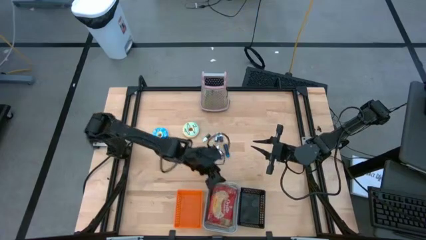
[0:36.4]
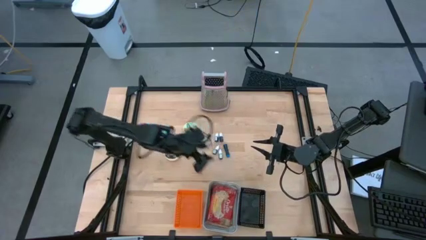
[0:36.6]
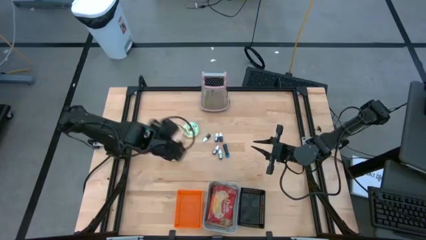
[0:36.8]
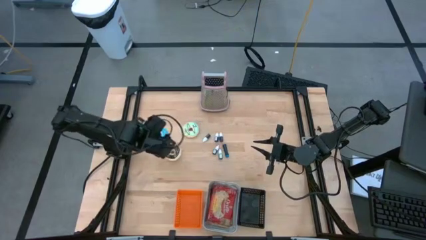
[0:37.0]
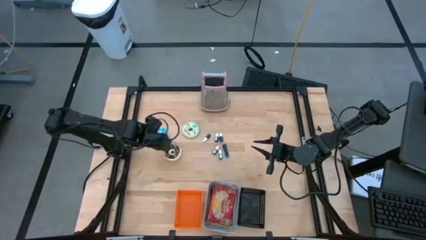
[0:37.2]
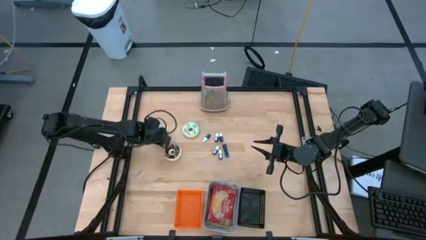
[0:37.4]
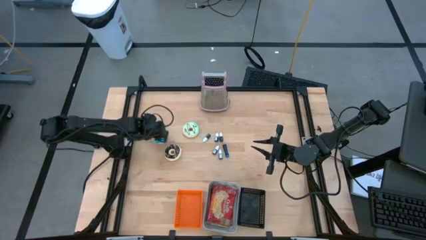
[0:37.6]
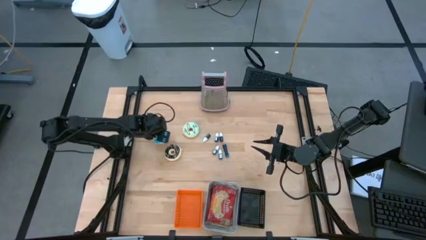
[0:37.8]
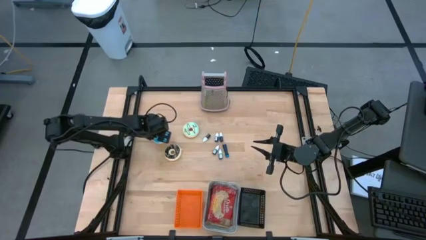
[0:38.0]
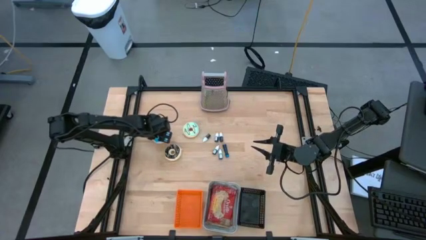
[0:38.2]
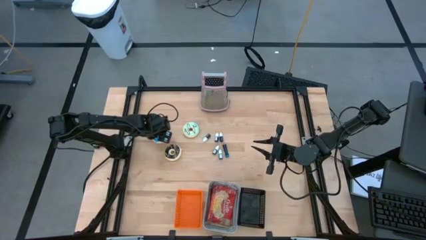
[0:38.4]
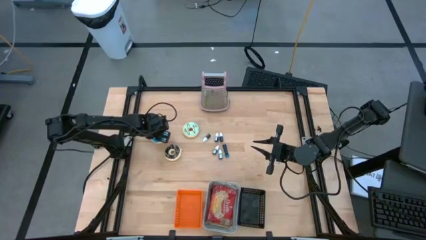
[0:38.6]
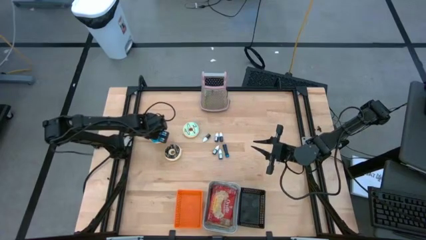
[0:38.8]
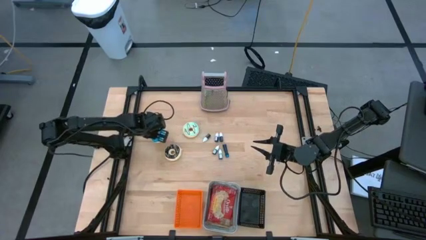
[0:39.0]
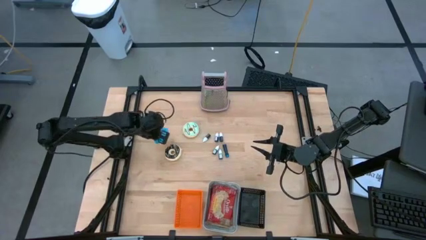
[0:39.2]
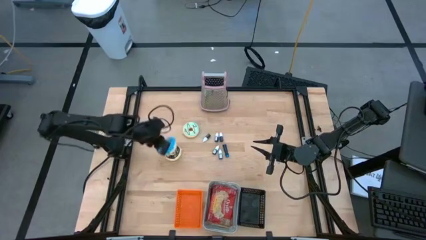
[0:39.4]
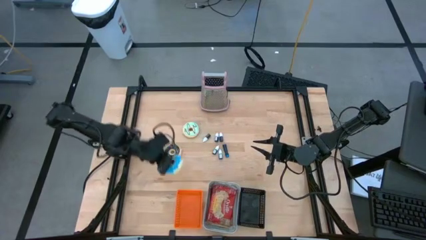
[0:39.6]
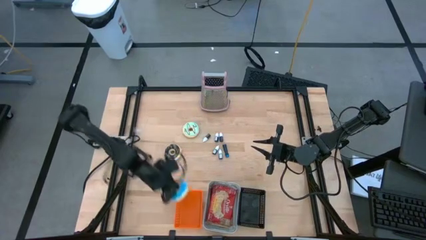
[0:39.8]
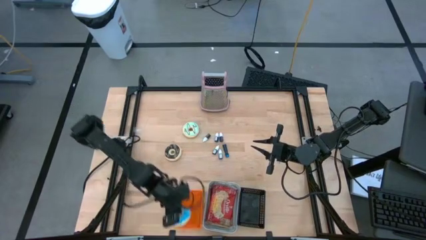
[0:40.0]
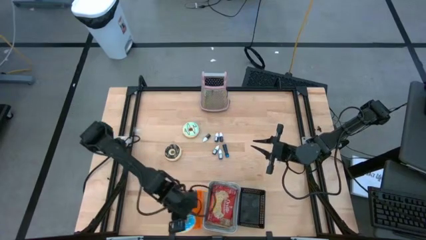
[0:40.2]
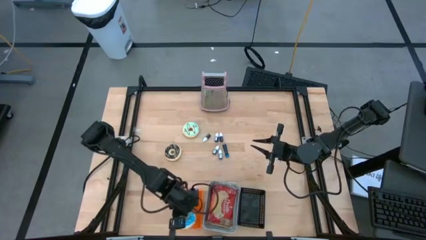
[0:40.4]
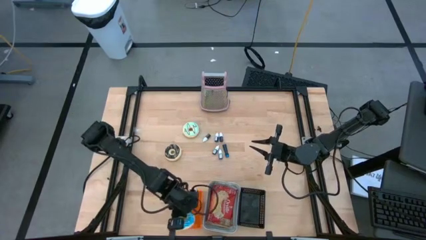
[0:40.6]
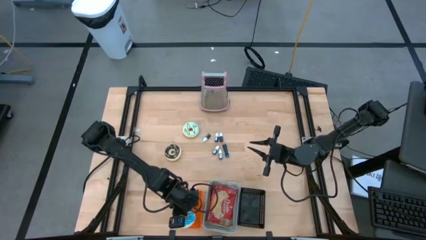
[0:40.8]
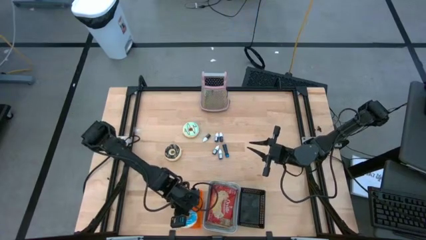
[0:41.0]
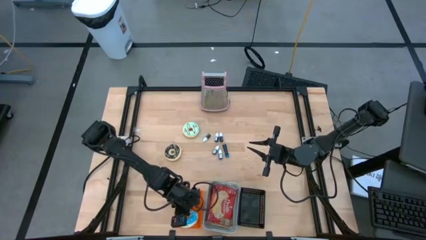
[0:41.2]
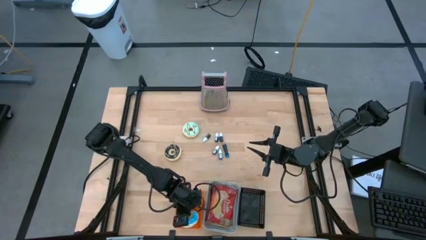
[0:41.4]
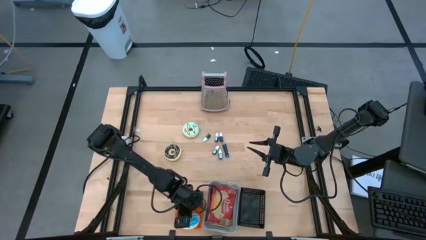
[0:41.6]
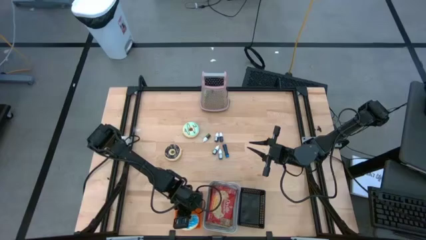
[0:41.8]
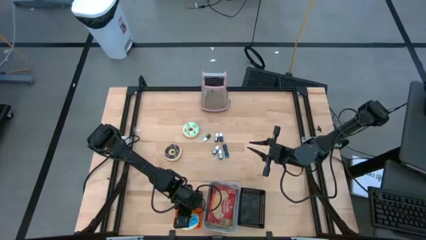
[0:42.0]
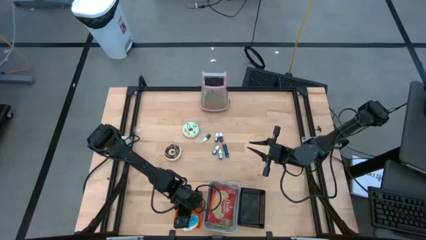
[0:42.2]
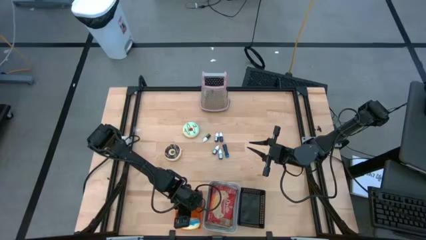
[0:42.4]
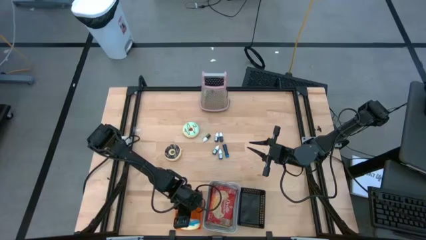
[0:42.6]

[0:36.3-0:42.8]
Put the blue donut into the orange bin

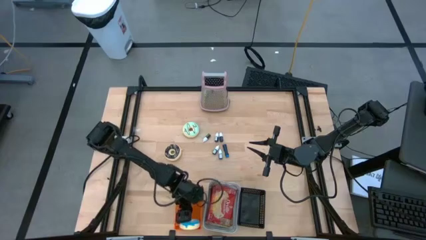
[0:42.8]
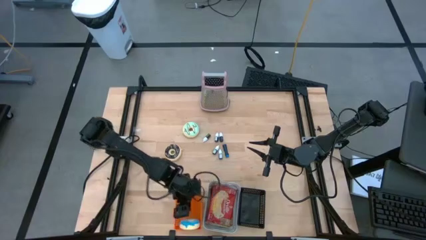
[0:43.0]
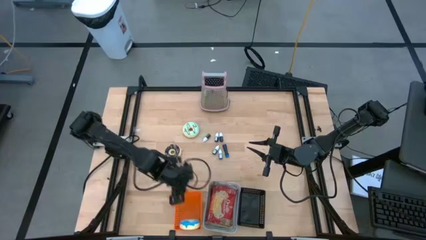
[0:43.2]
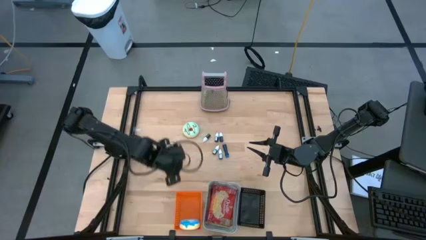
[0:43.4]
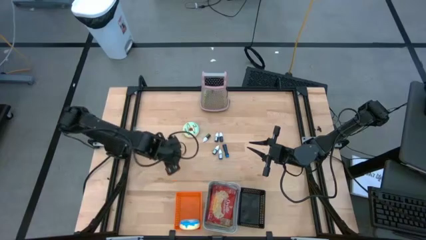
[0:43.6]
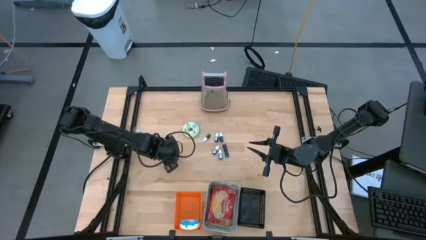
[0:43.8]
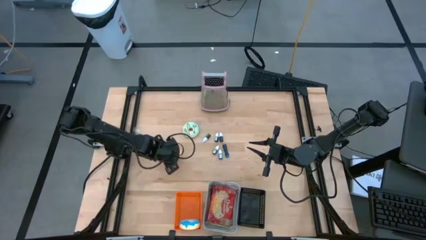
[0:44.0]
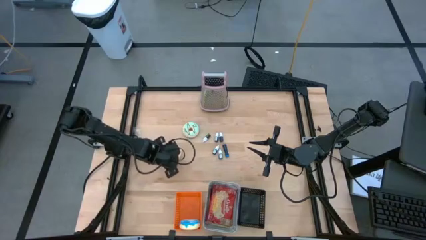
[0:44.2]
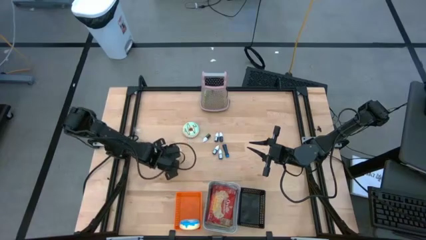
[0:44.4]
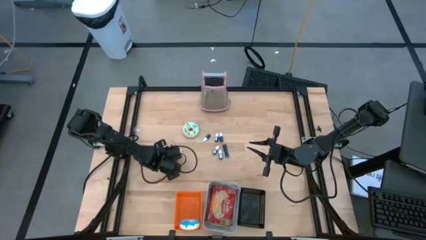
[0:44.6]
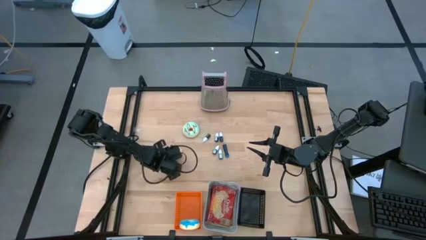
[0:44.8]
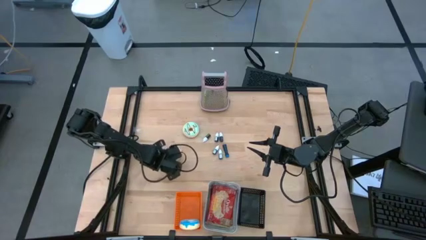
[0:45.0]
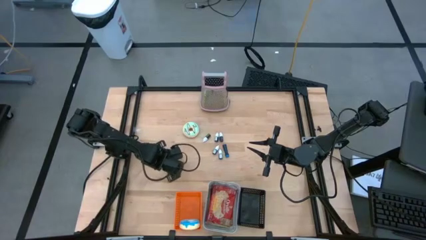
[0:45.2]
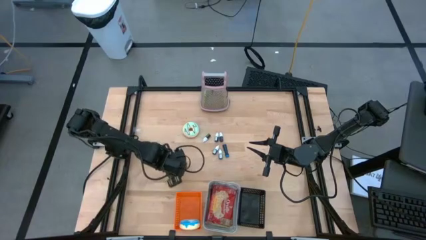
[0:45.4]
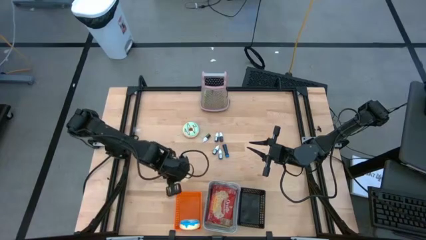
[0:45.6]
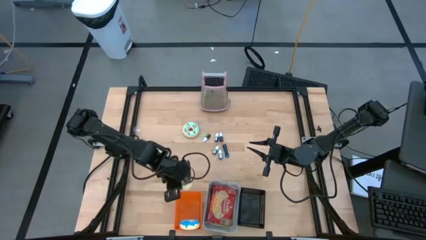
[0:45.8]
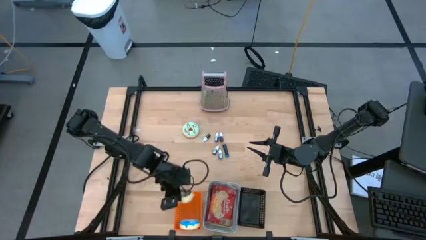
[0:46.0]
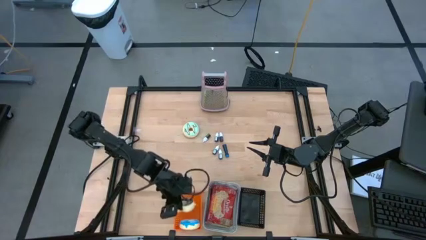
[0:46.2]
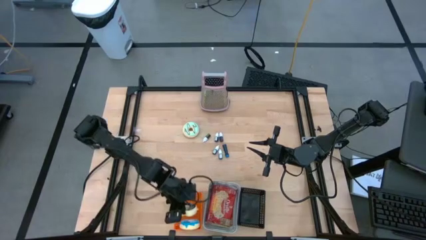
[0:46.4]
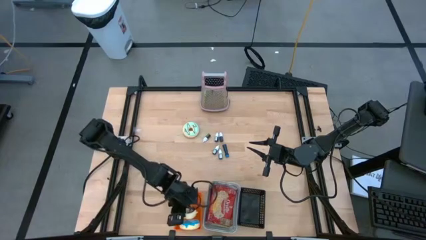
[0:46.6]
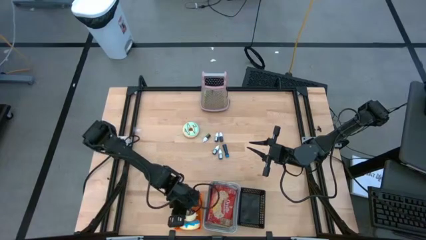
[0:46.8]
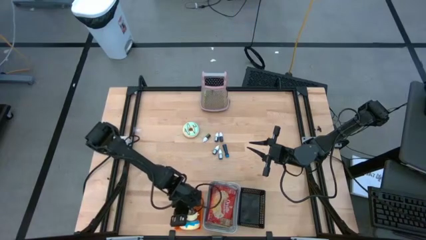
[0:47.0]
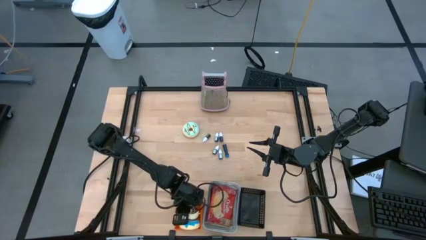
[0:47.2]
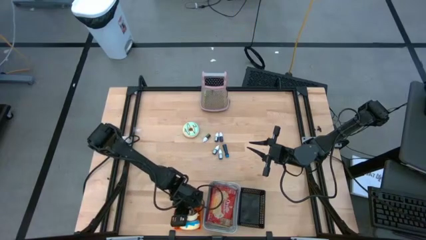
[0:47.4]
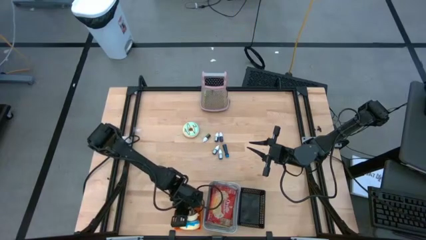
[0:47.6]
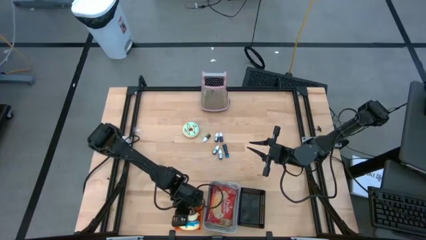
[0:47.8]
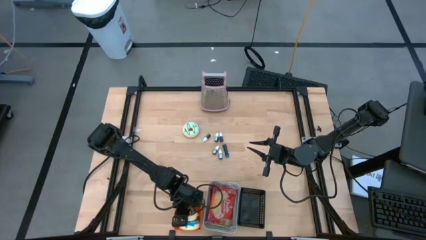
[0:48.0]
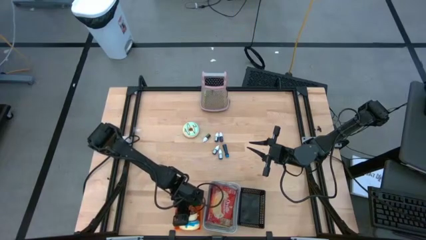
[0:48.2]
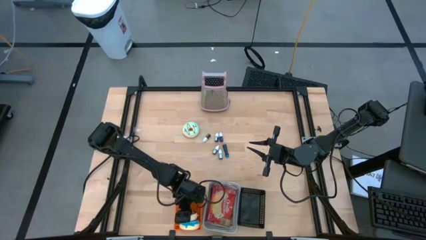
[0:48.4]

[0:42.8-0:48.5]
Put the black donut into the orange bin

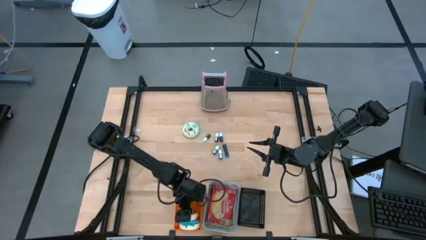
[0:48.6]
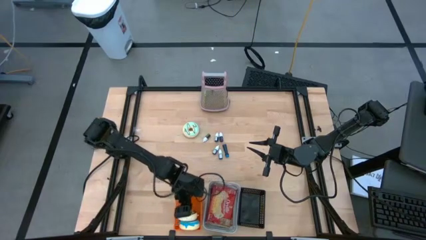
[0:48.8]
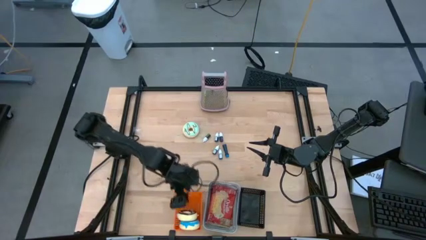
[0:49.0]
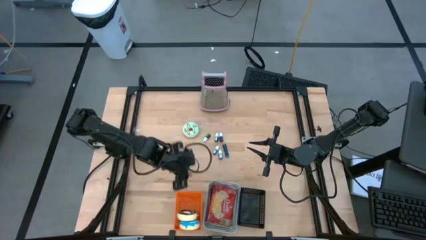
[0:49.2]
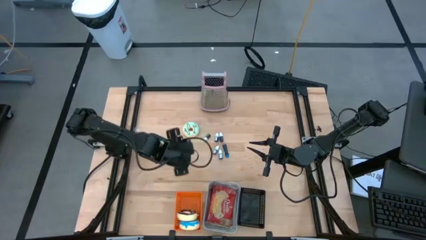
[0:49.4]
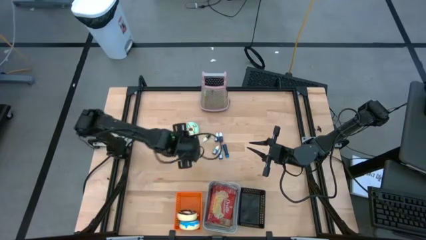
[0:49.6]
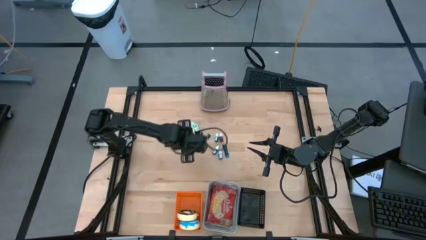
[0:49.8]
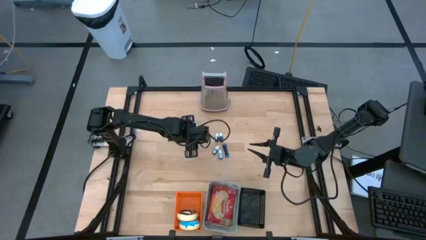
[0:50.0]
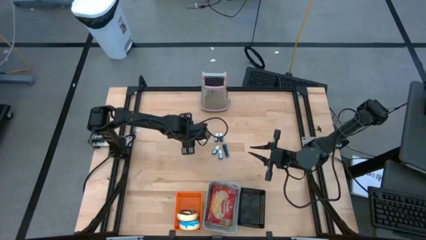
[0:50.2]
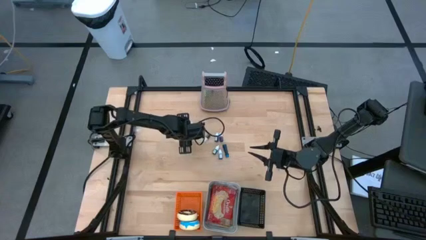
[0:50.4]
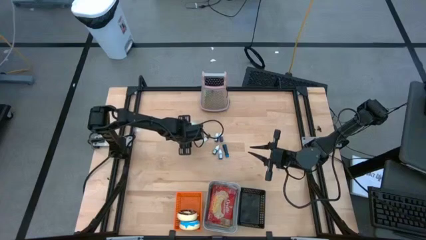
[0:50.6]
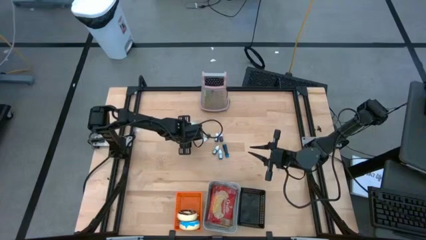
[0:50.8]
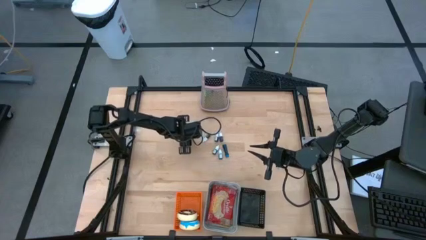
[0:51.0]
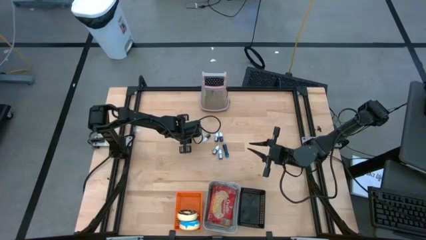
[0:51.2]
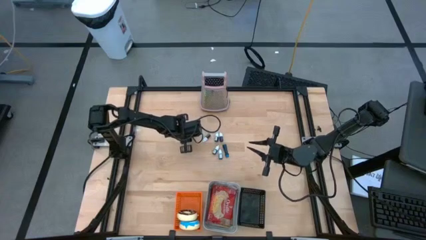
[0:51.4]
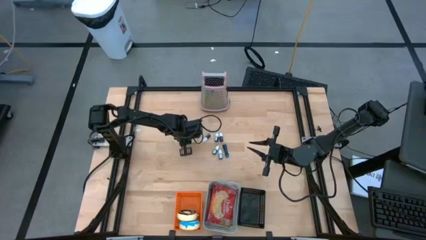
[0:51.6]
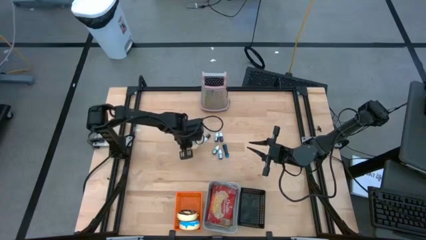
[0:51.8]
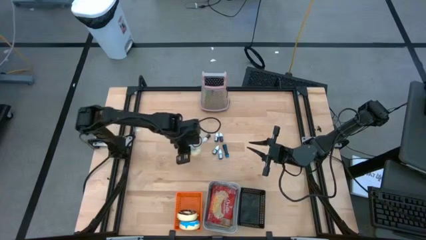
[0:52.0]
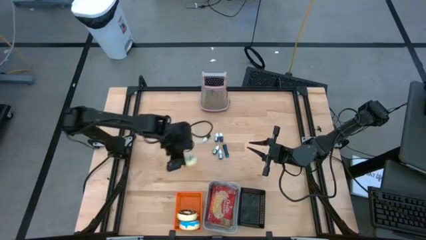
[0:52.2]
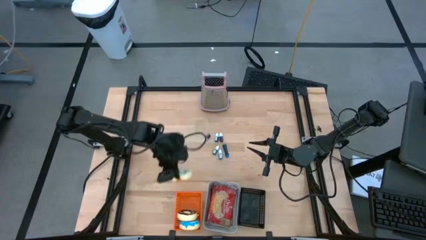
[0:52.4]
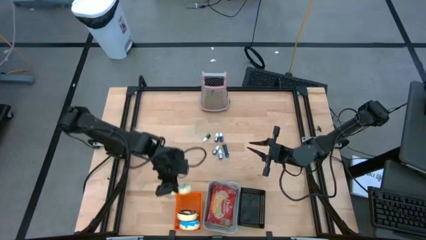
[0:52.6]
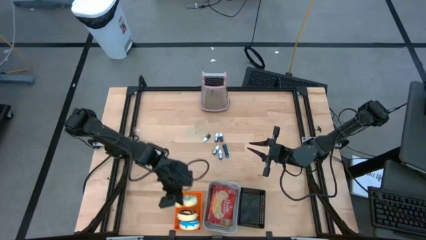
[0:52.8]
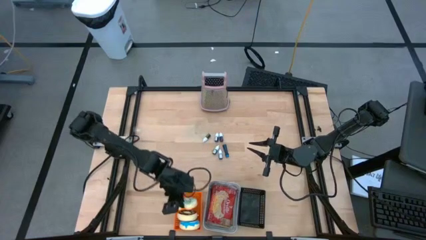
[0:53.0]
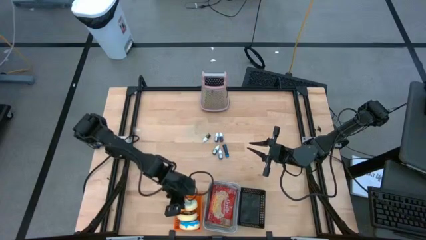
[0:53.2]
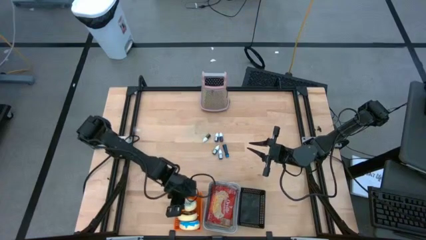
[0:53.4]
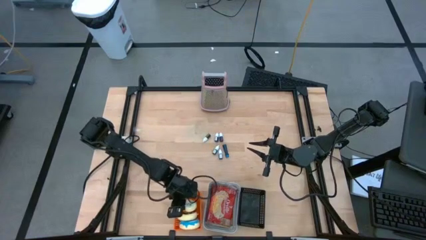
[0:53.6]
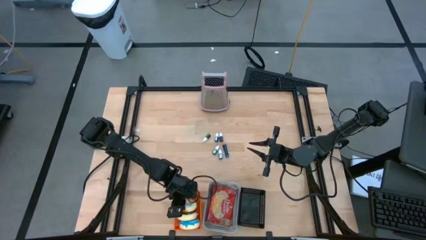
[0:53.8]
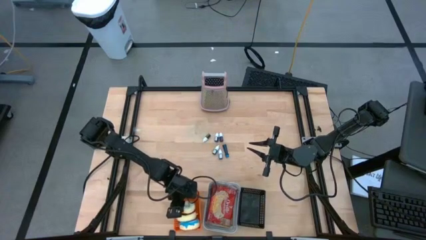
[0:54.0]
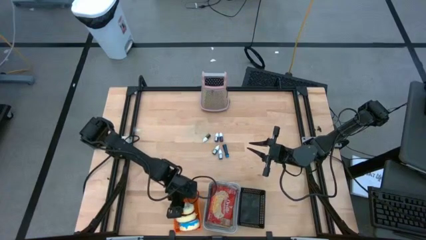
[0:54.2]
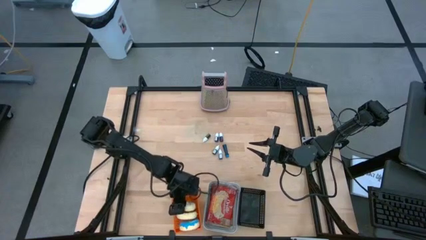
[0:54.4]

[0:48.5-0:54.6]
Put the light blue donut into the orange bin
